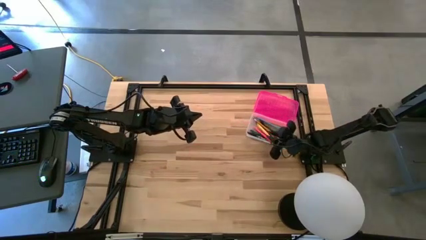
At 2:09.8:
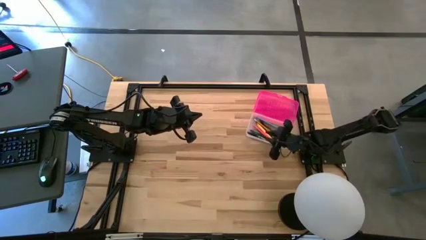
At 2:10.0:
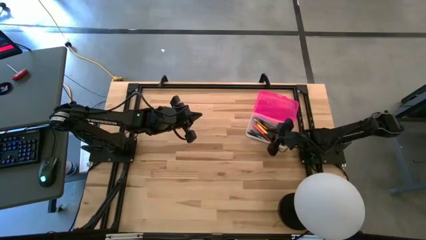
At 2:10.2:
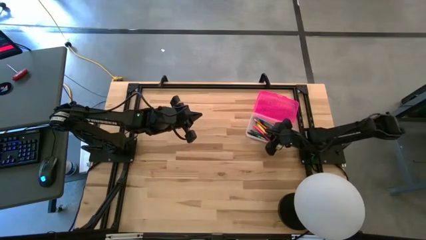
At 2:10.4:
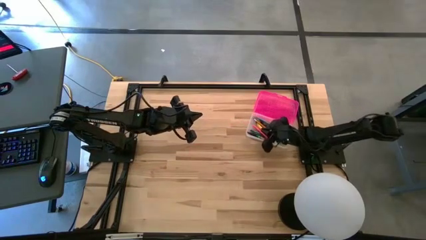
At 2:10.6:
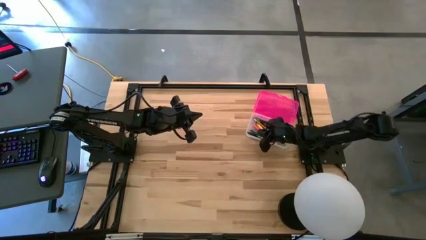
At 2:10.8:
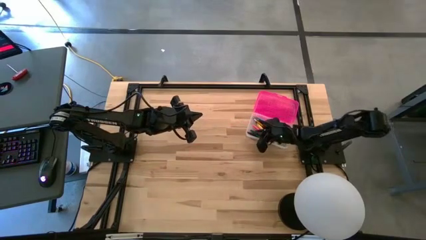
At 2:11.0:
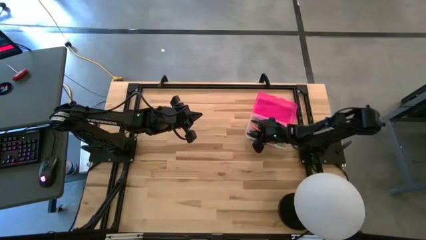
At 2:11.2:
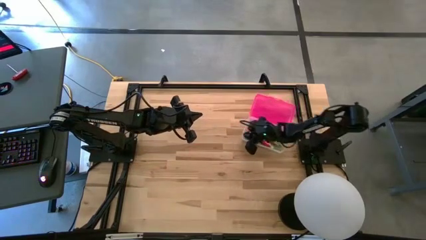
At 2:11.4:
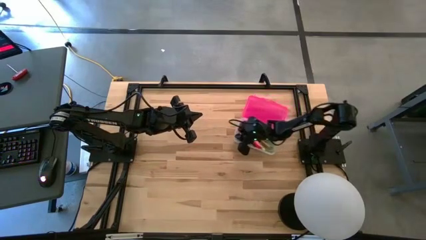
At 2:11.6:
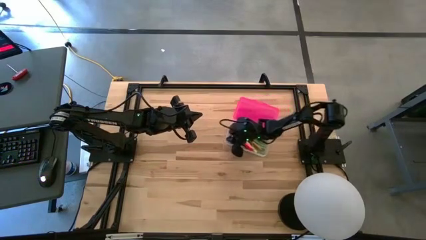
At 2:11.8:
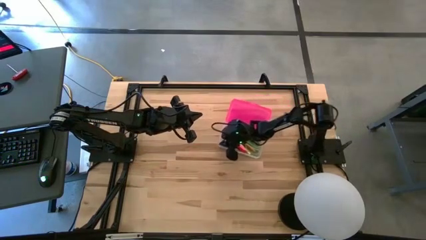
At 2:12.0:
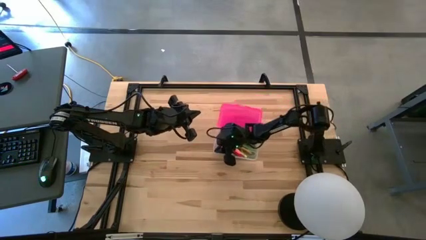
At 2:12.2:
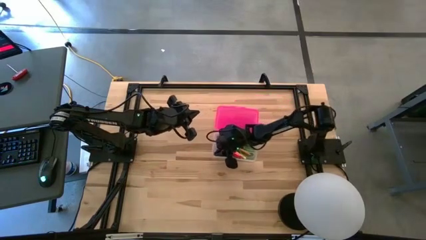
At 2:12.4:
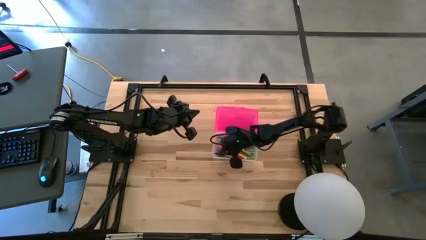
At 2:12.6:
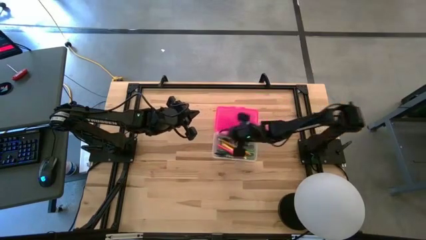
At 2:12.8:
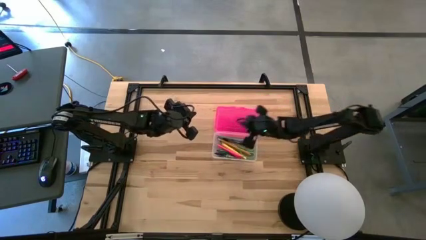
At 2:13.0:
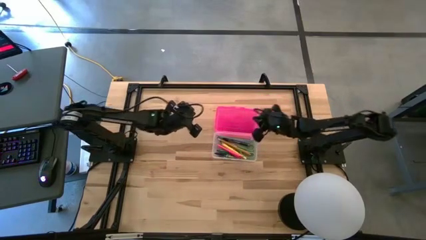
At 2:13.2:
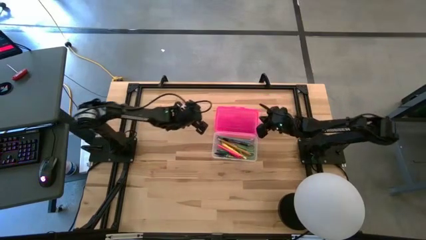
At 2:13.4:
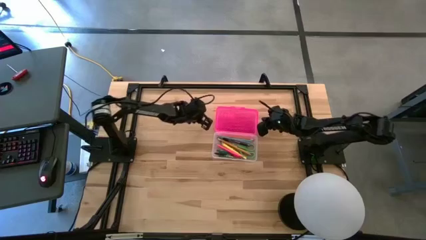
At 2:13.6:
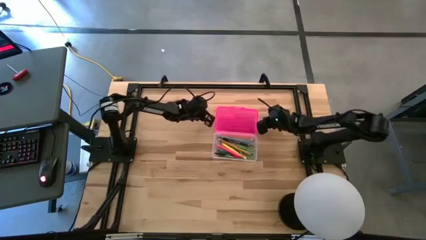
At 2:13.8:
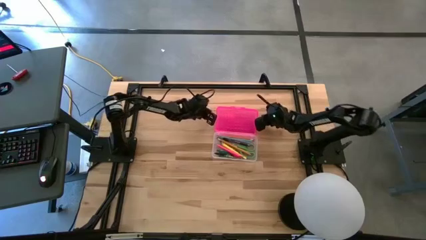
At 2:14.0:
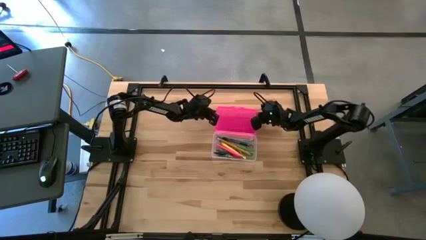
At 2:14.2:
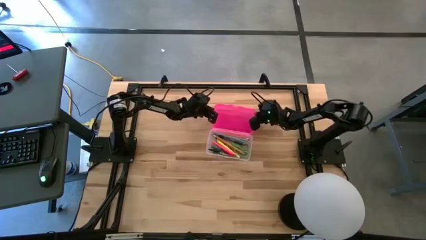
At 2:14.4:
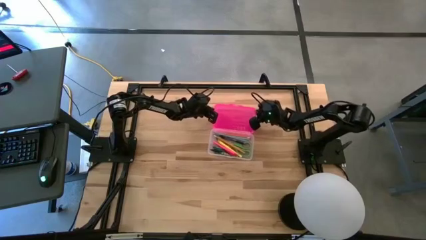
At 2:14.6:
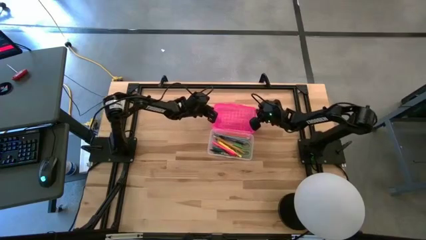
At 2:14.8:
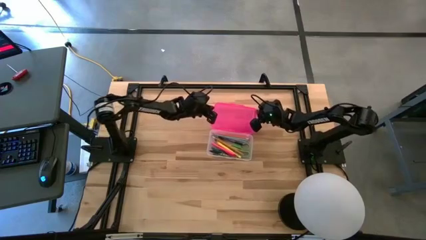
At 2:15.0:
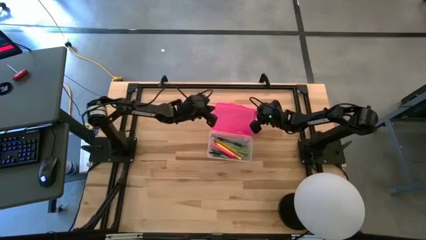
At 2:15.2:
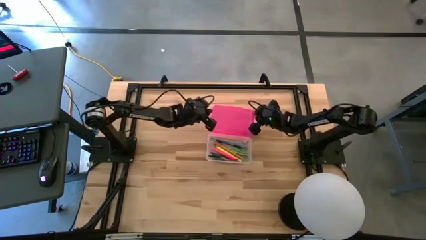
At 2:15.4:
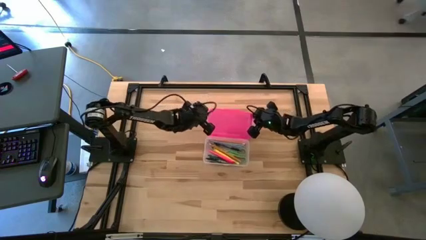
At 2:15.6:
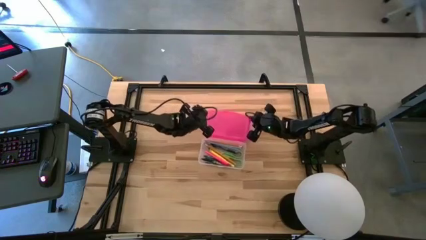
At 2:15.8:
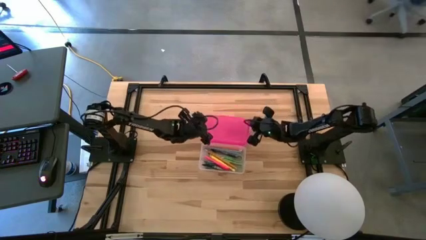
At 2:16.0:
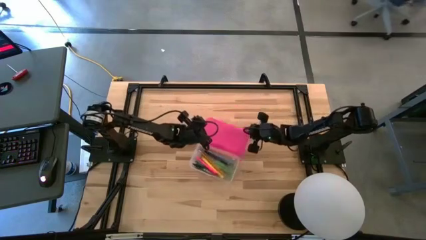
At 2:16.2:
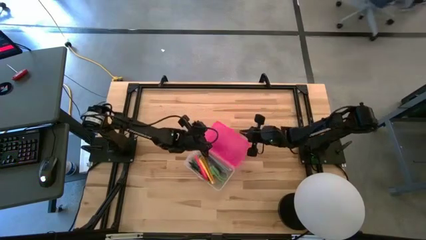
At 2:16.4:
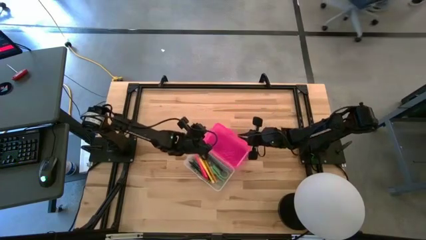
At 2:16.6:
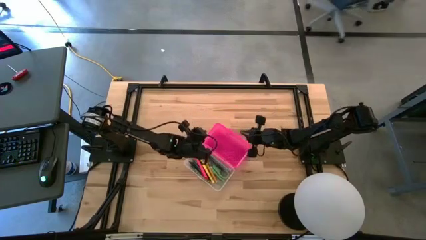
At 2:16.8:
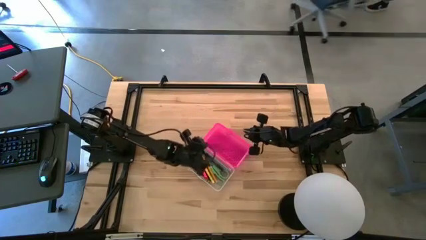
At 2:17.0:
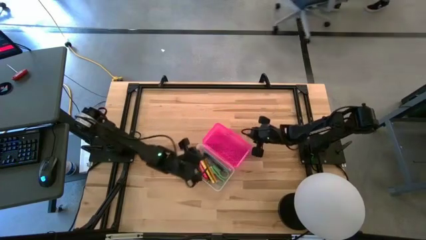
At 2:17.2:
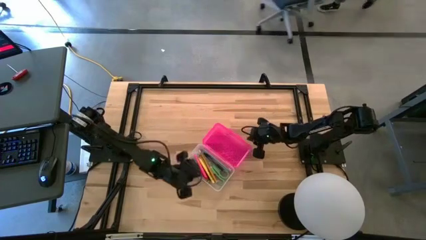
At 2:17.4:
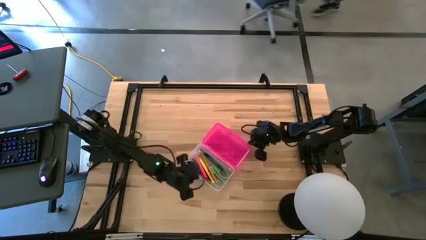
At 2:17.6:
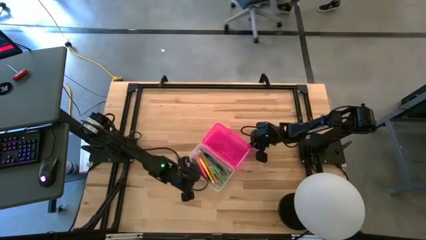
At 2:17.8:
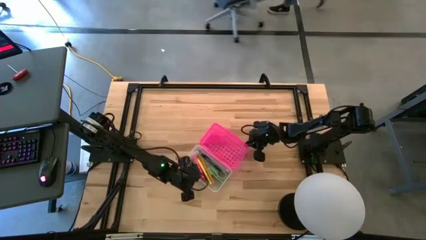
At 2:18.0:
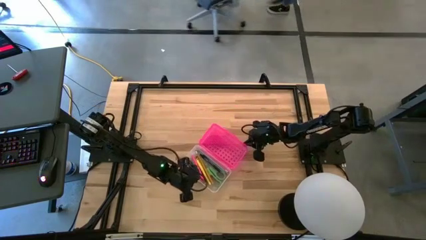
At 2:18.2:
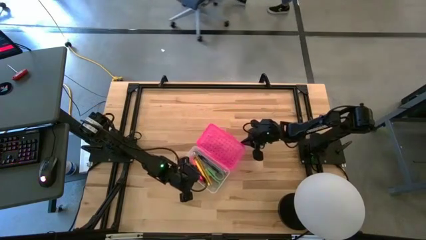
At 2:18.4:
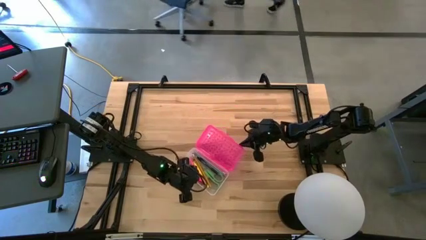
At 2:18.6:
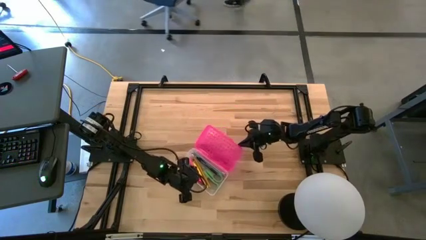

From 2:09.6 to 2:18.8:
Task: Pick & place school supplies into a supply box
Close the pink supply box

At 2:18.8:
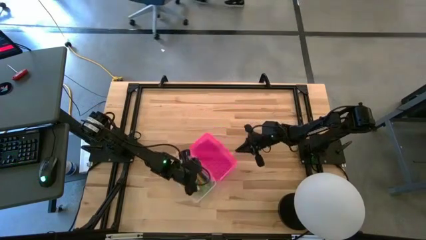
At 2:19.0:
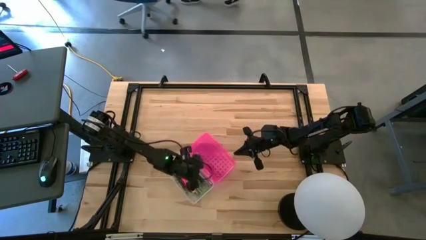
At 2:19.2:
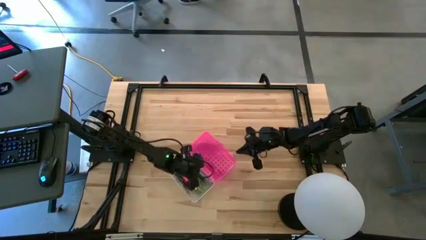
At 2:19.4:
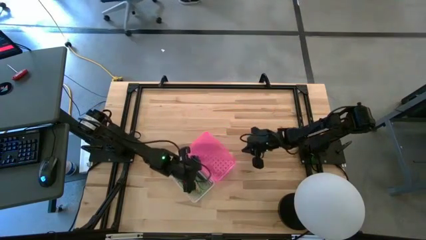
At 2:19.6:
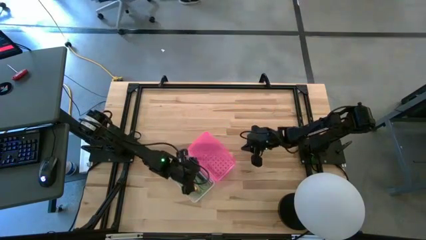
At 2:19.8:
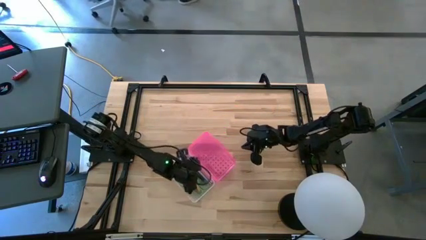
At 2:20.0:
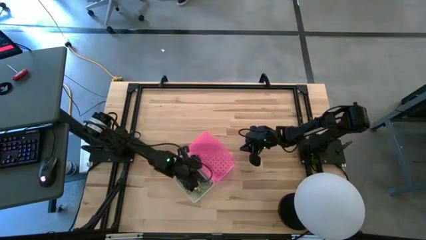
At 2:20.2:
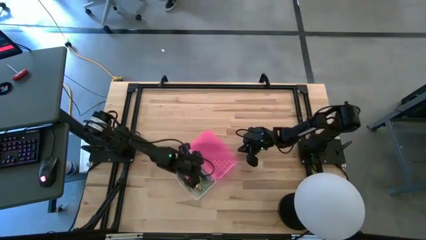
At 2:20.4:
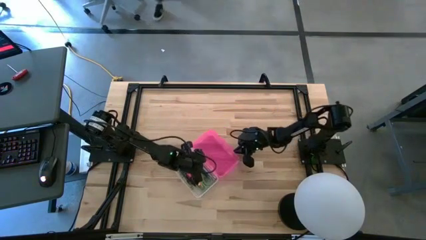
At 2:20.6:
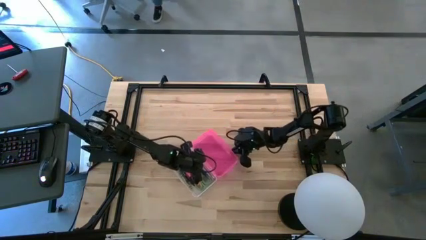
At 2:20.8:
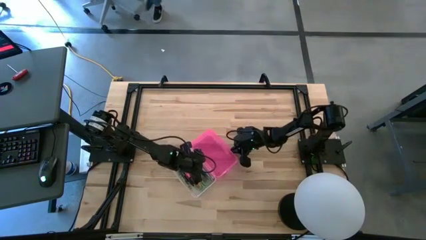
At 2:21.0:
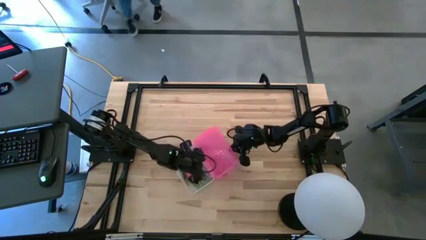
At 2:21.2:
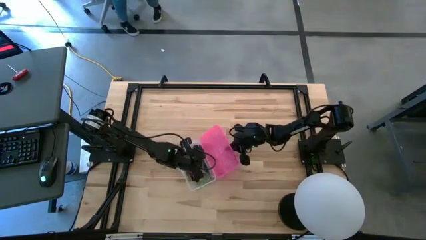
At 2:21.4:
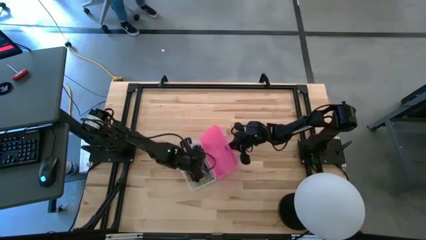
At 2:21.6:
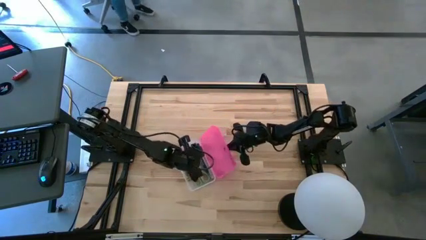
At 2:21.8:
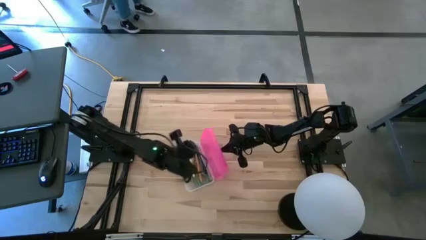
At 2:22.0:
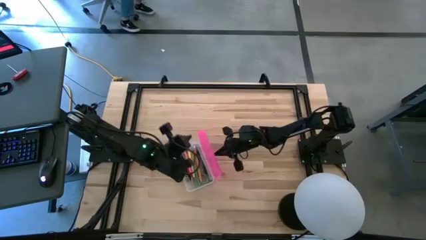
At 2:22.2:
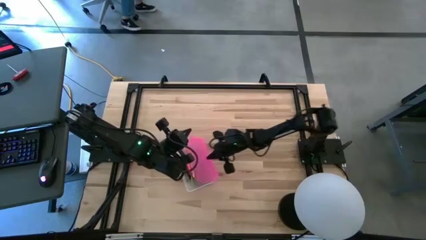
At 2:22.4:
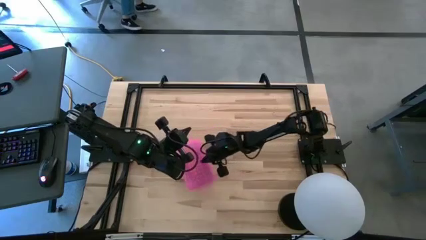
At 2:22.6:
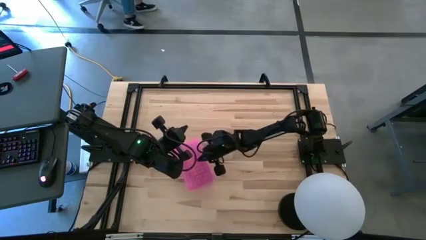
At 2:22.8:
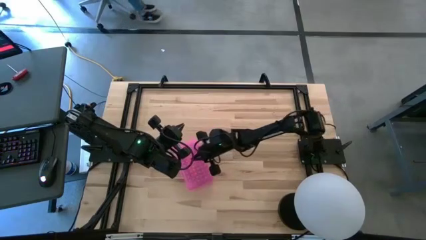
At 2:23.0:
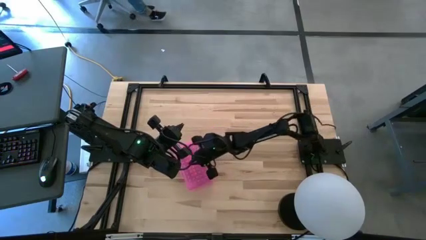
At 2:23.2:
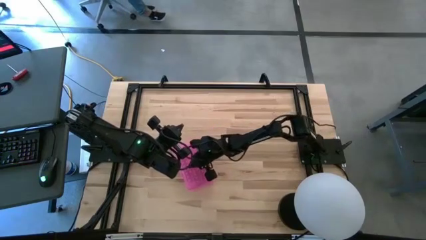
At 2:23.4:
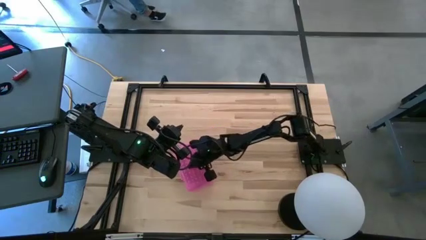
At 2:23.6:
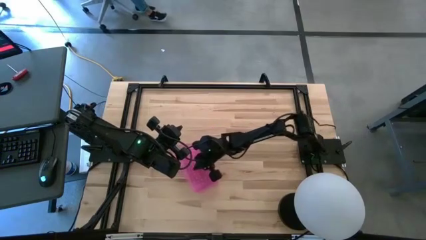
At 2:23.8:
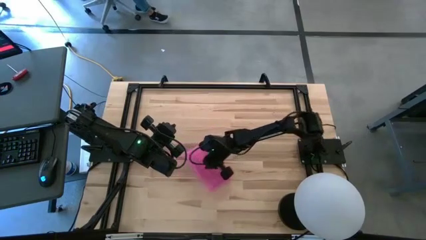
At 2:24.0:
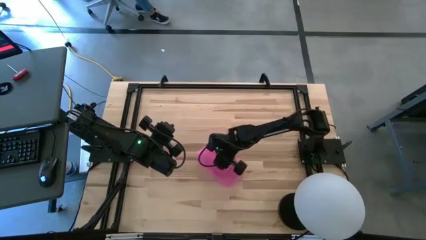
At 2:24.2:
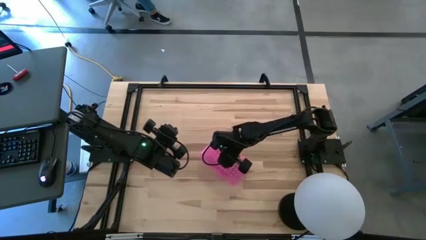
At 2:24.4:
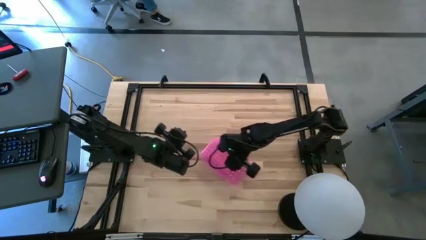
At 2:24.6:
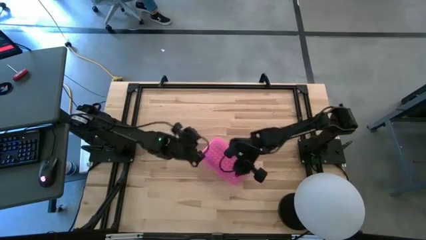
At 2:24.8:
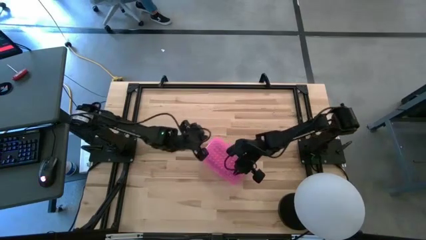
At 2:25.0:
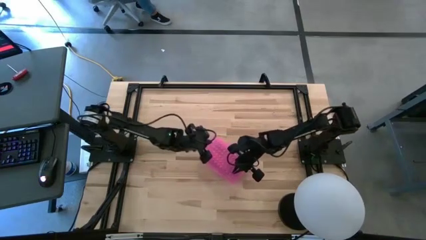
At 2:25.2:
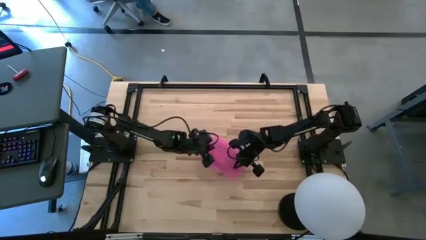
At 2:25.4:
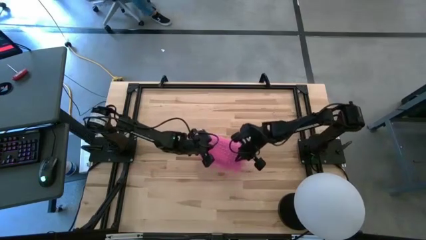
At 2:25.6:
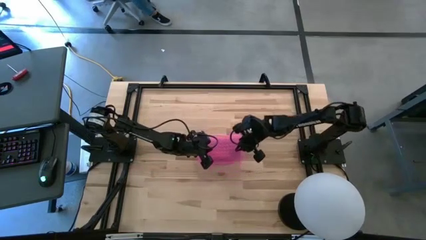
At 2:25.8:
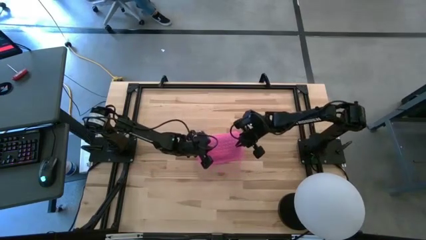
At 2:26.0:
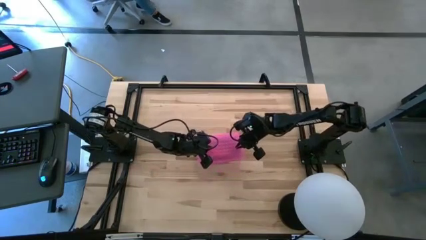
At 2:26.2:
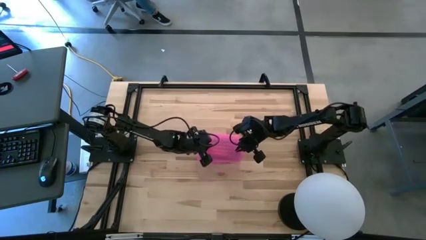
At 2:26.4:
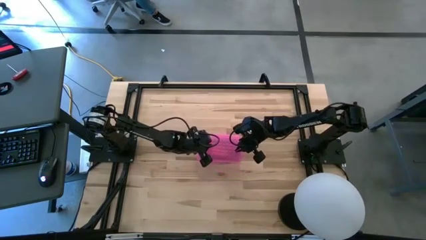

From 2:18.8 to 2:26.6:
Close the pink supply box
